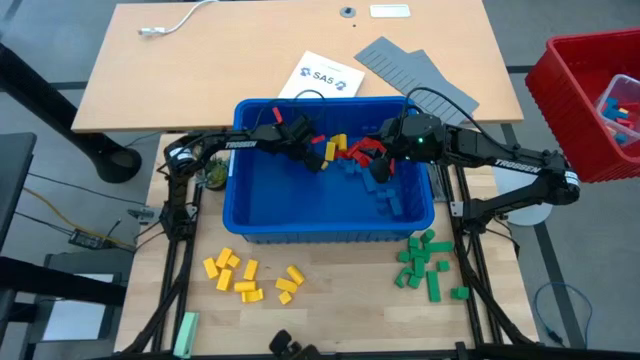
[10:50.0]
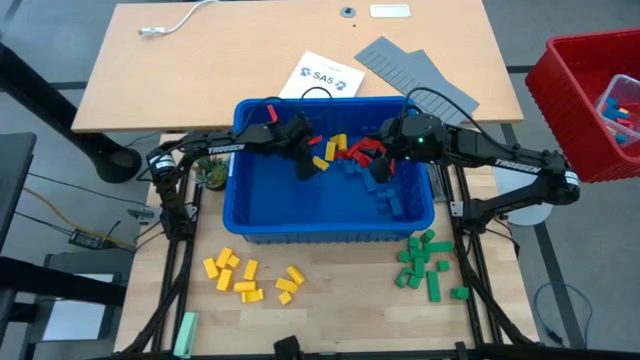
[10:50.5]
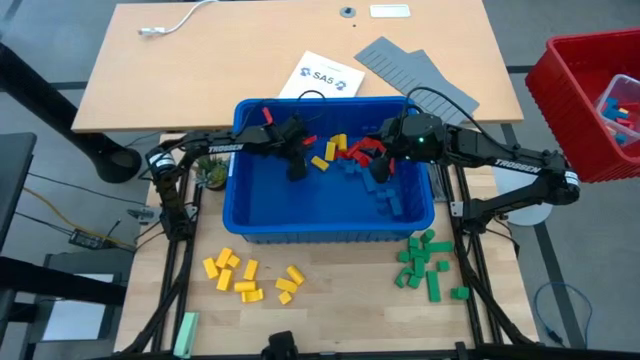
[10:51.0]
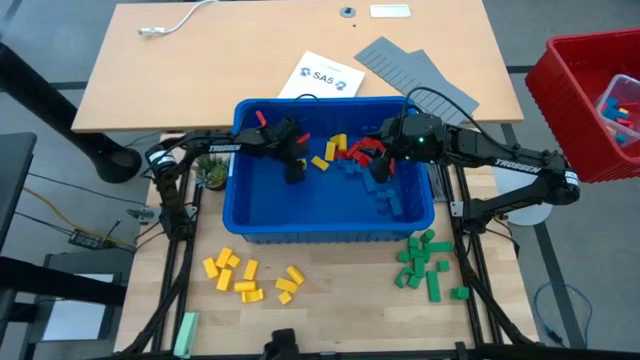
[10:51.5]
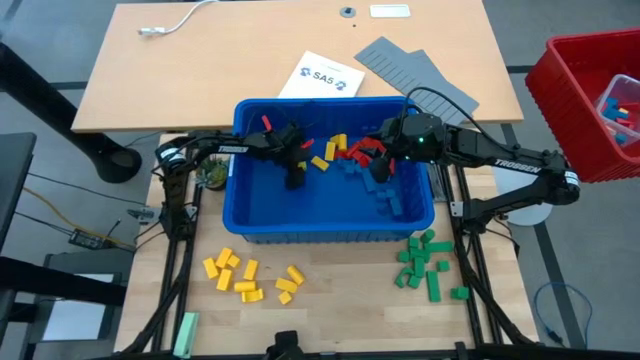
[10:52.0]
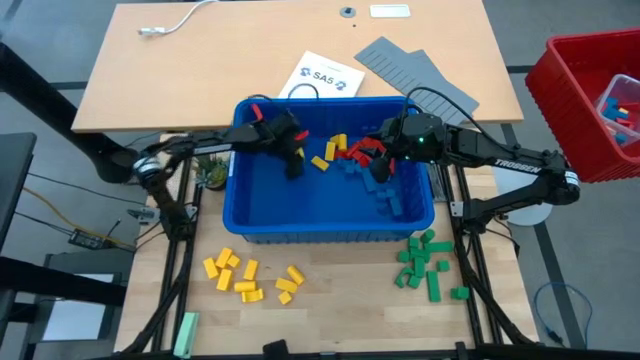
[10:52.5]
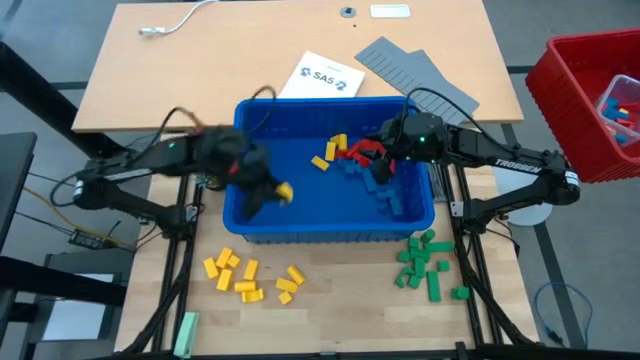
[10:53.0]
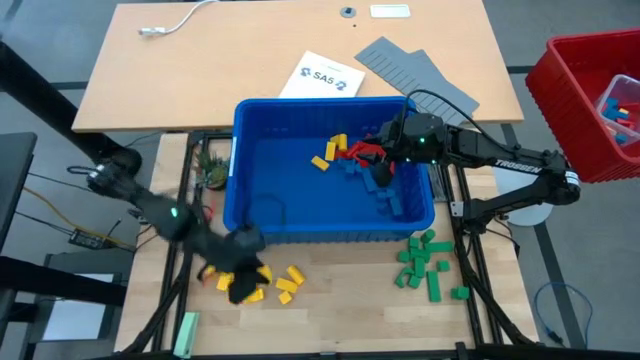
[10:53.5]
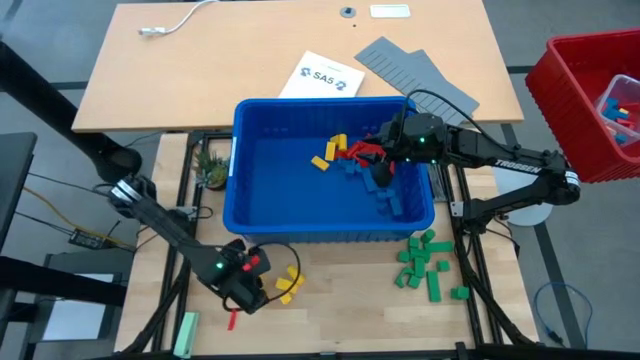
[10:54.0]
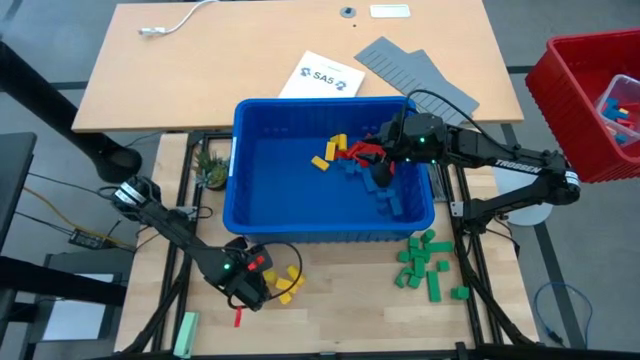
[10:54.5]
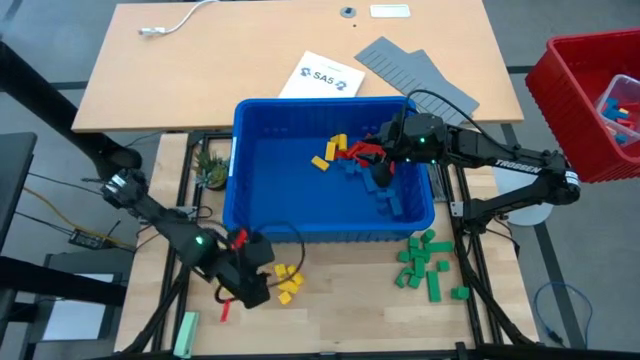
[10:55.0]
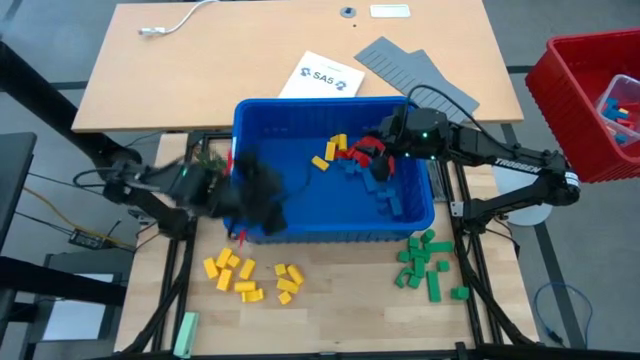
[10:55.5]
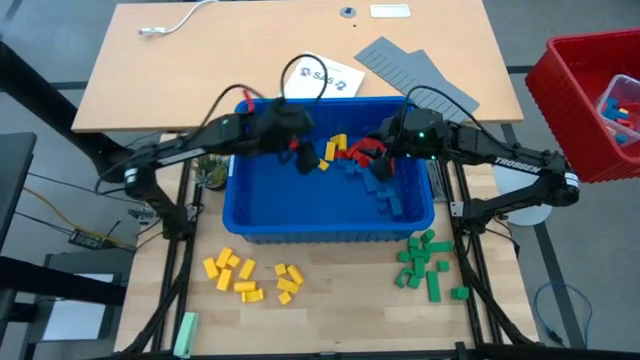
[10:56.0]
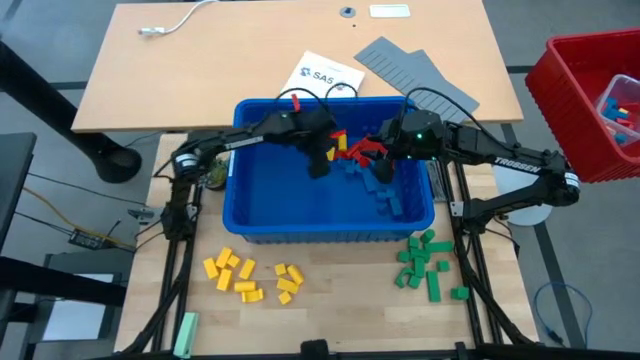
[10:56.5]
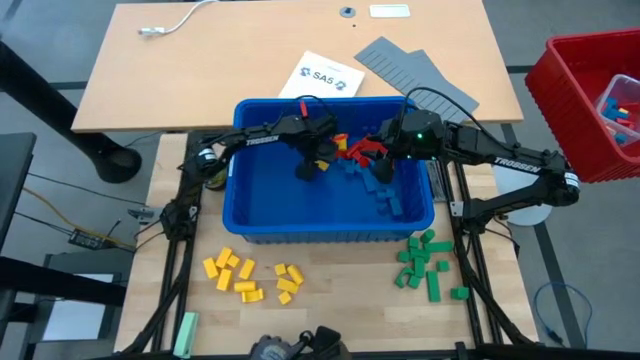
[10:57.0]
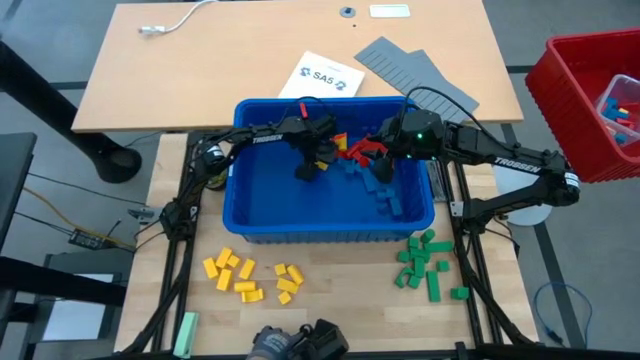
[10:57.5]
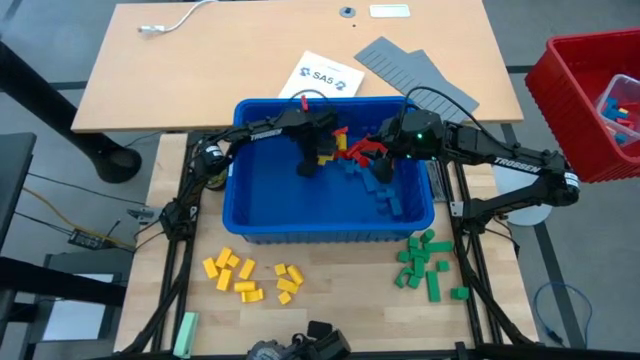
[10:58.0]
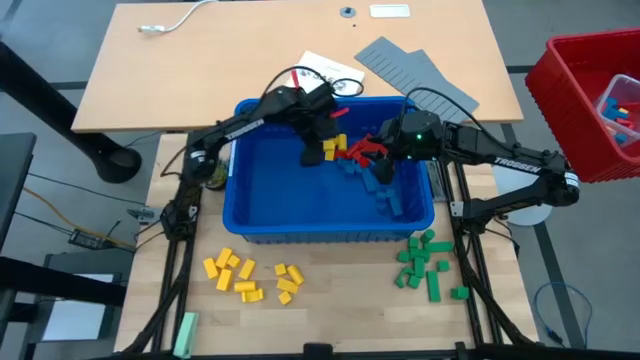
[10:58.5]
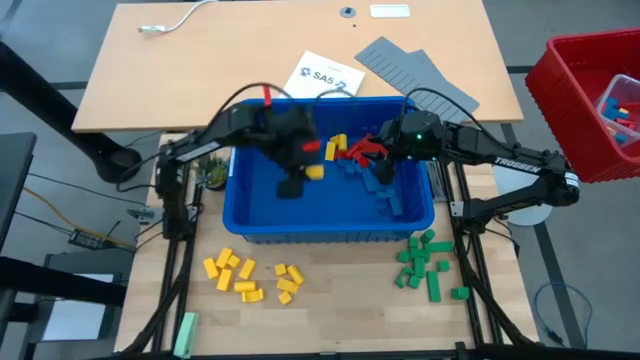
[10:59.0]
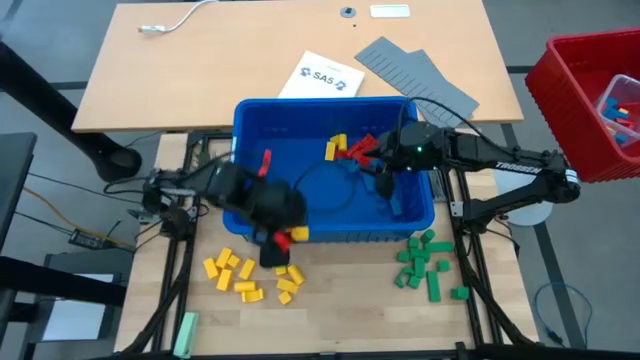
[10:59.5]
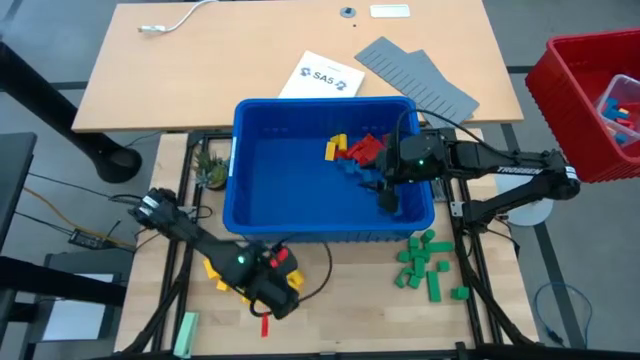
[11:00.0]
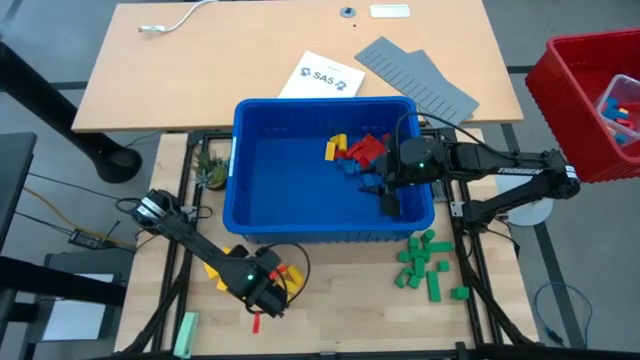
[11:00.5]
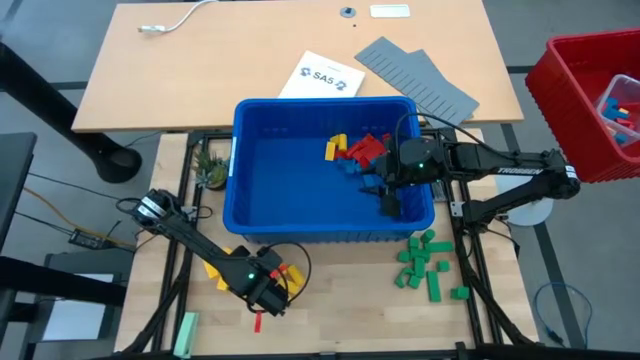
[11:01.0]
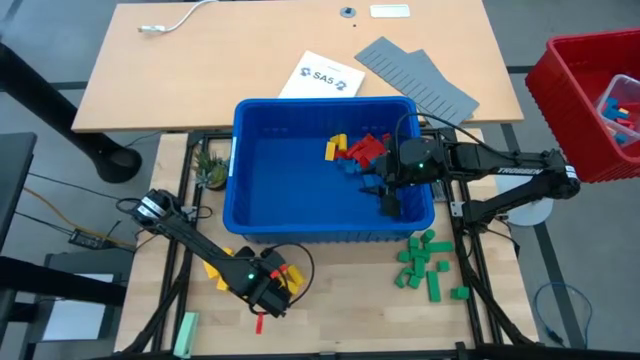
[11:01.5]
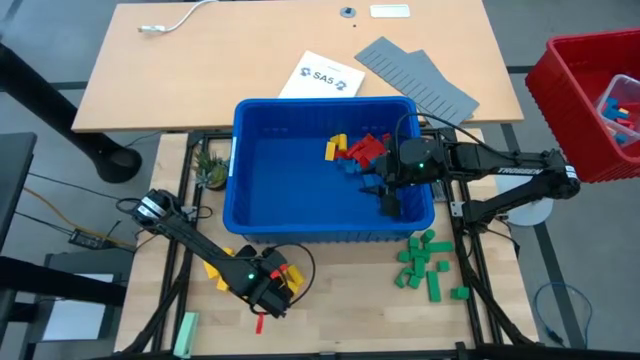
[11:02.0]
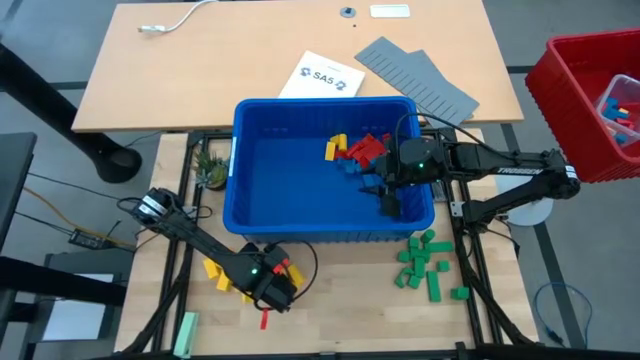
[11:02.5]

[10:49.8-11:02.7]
Task: Sort blocks
Remove the yellow block from the blue bin

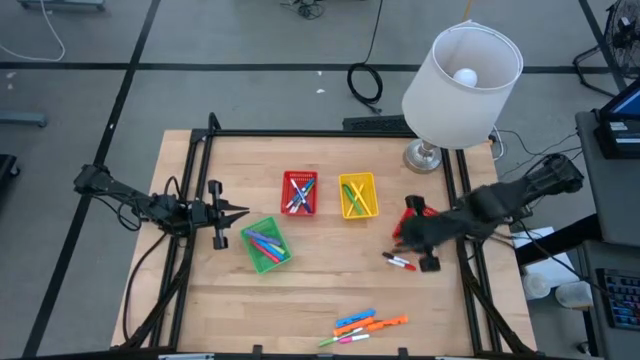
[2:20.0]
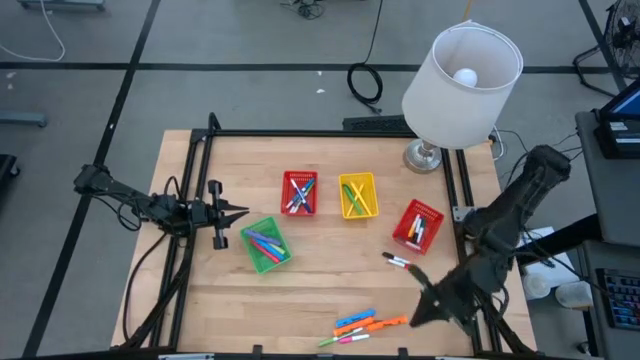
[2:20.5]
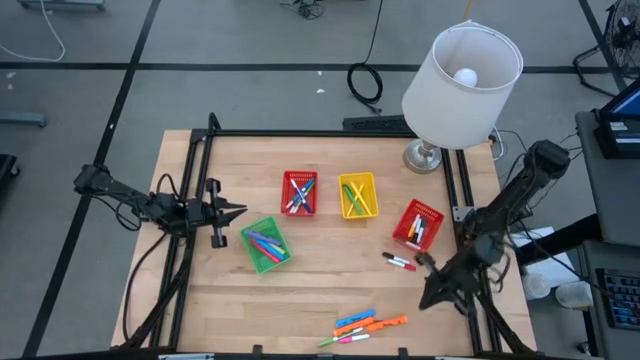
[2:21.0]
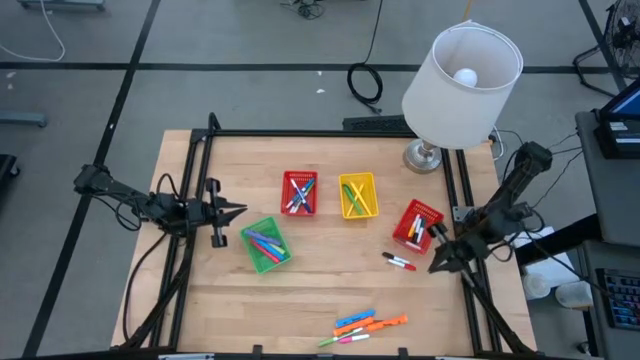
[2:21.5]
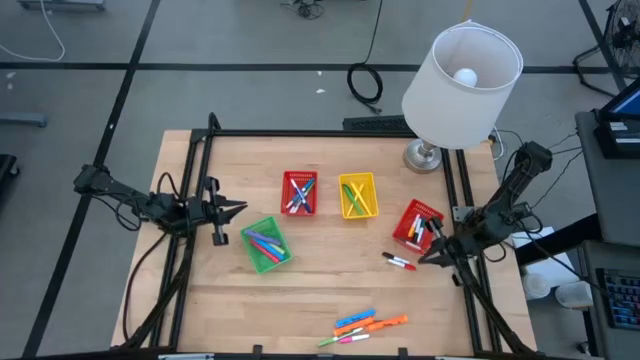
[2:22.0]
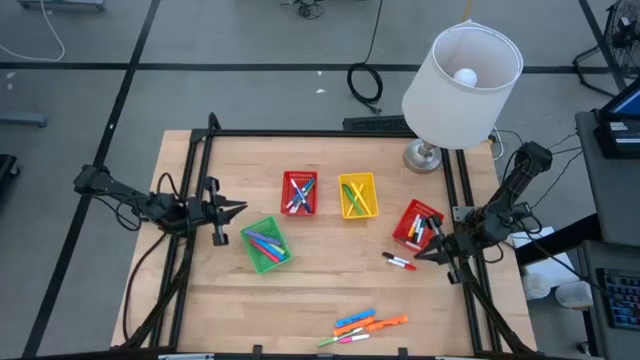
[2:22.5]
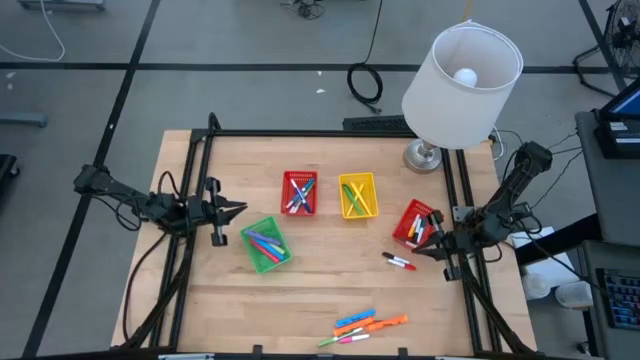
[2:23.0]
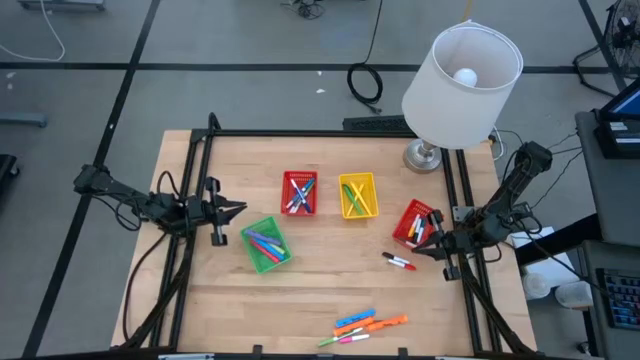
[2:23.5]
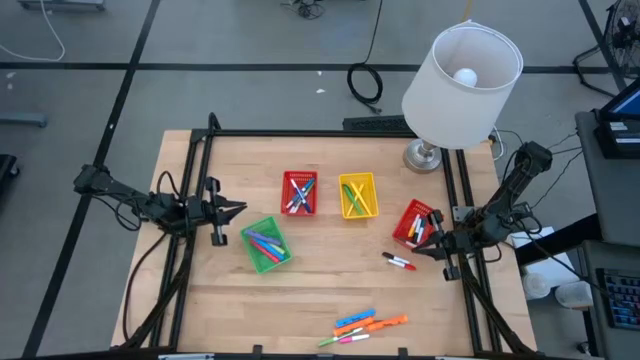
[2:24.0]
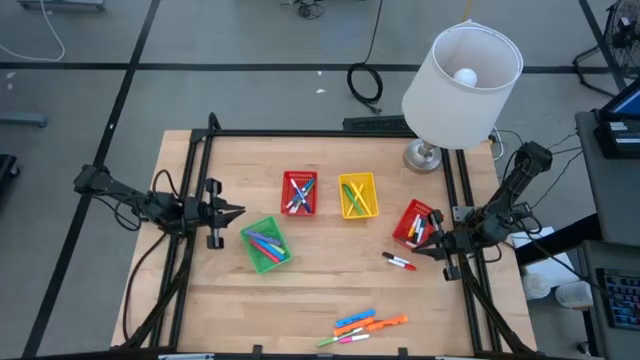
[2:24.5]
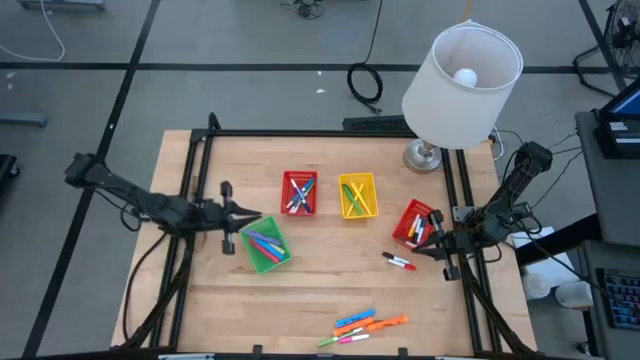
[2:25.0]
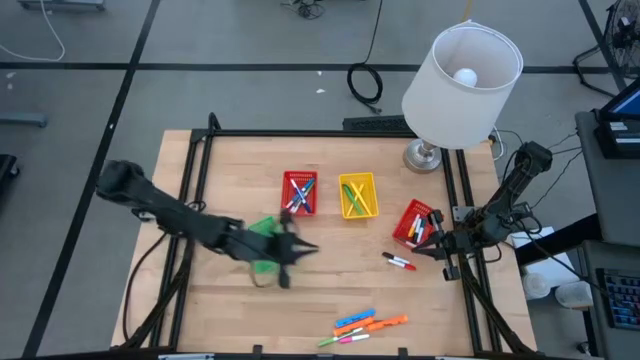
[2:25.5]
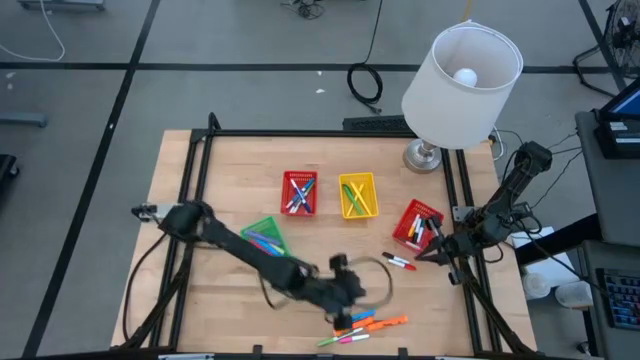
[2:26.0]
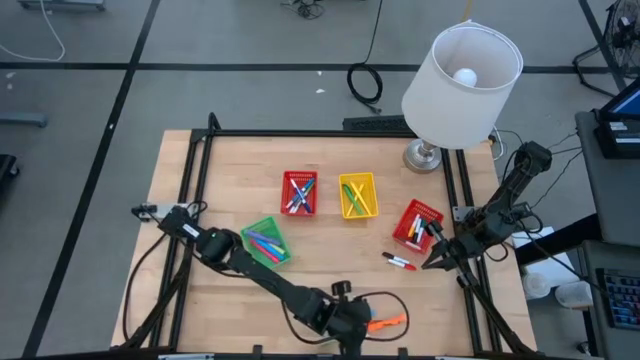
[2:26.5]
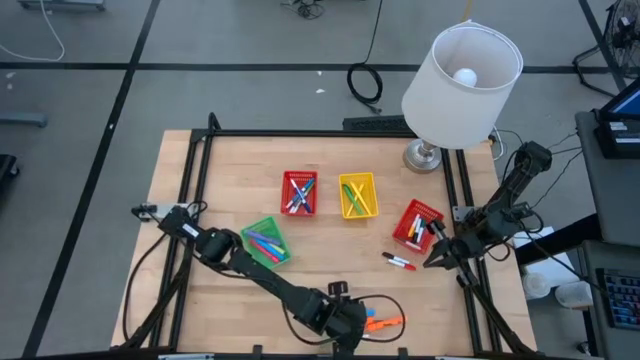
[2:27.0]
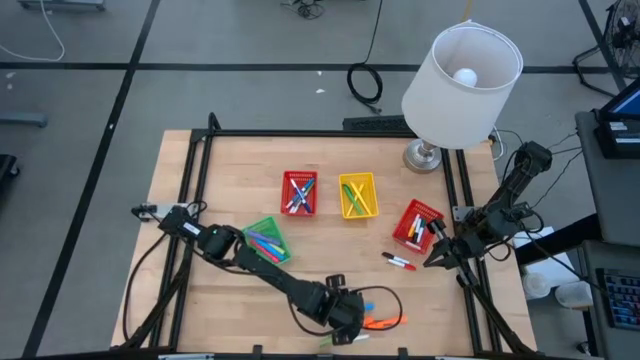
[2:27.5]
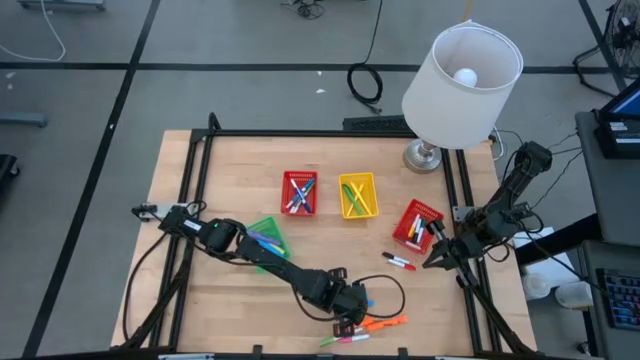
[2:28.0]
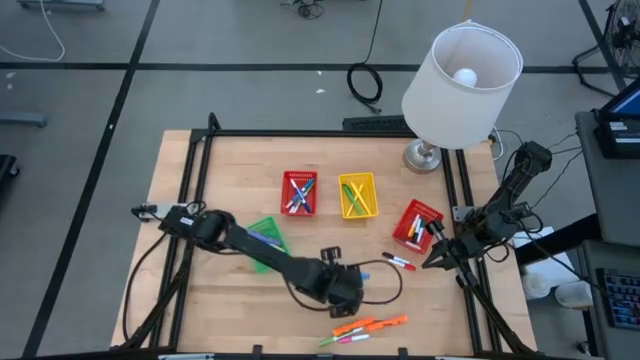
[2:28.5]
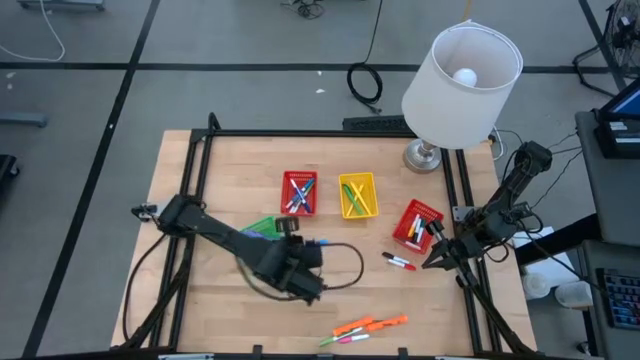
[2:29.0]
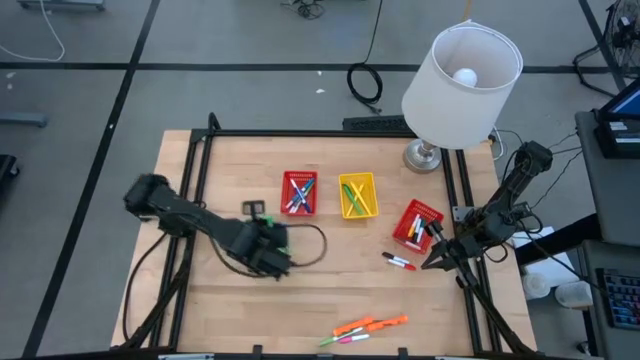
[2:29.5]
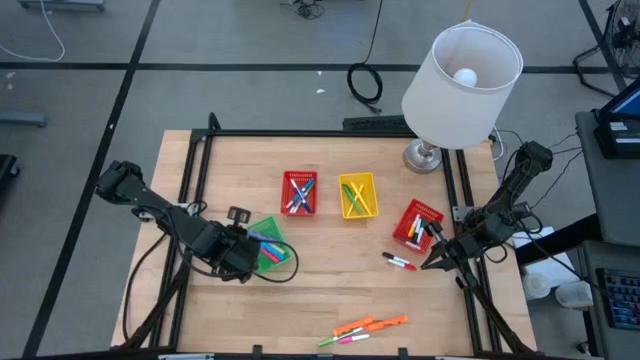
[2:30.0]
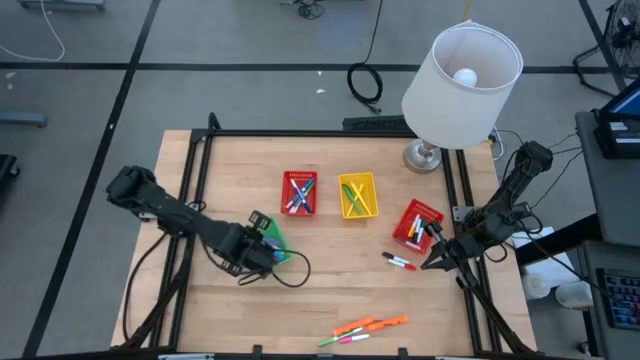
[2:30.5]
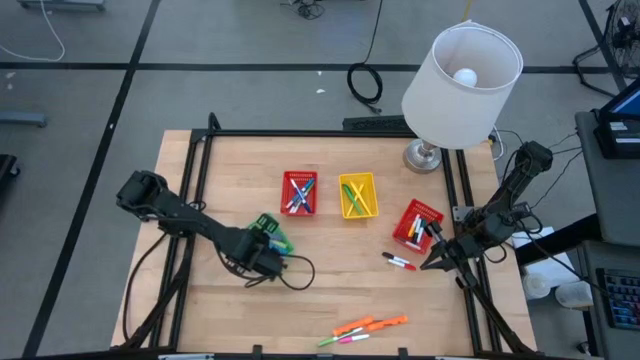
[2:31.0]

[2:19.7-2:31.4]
Task: Pick & Place Markers
Put the light blue highlighter into the green bin
